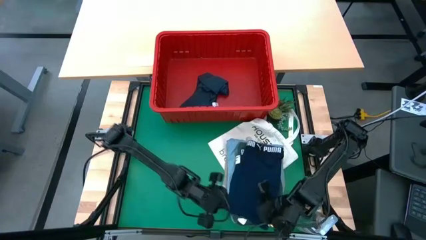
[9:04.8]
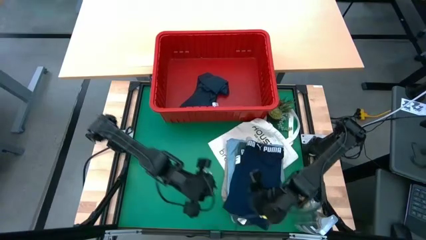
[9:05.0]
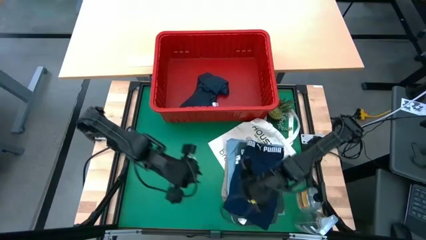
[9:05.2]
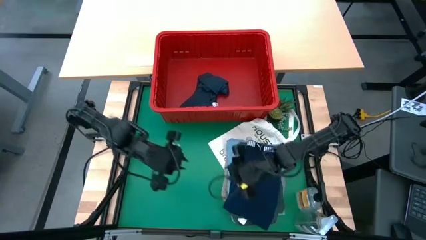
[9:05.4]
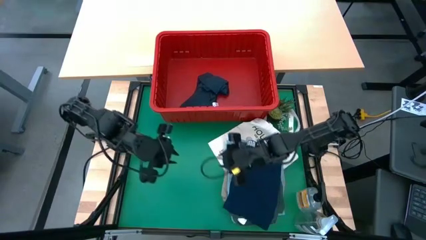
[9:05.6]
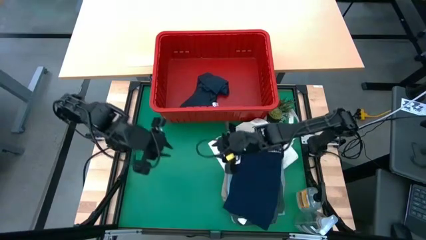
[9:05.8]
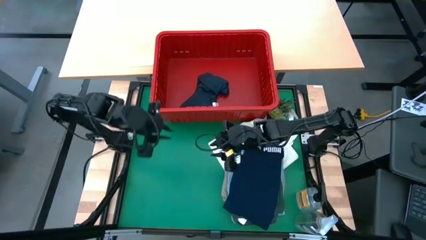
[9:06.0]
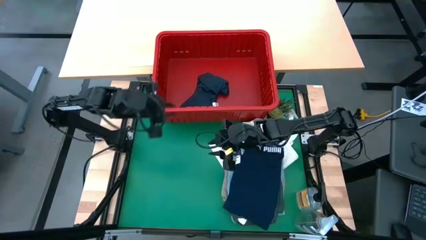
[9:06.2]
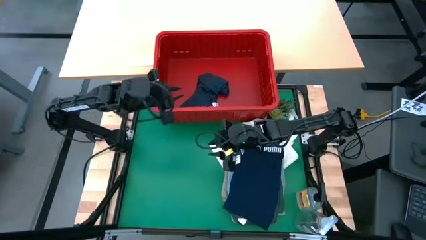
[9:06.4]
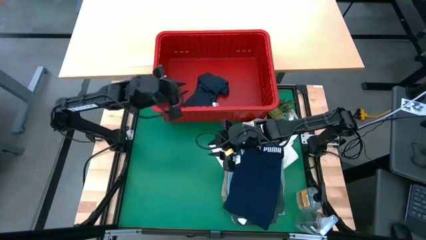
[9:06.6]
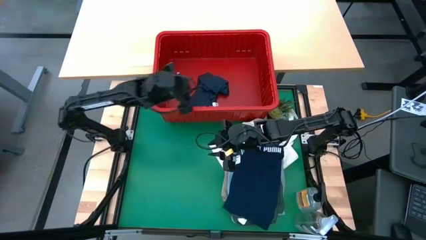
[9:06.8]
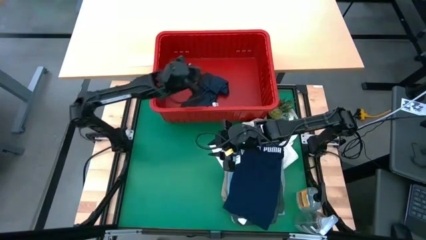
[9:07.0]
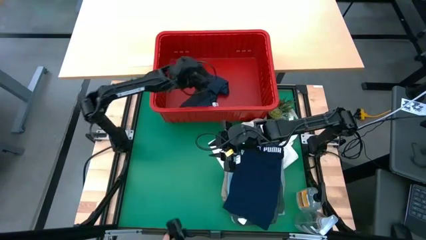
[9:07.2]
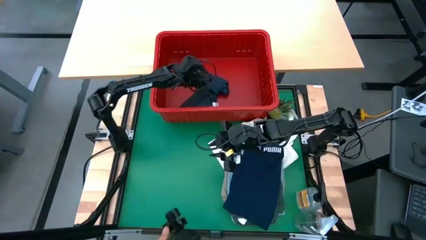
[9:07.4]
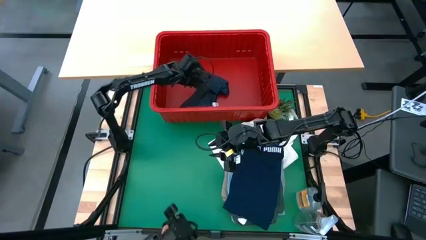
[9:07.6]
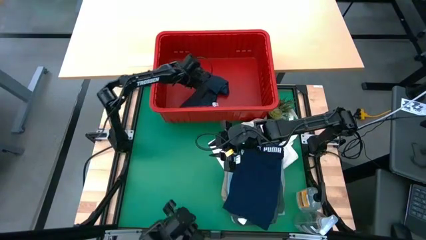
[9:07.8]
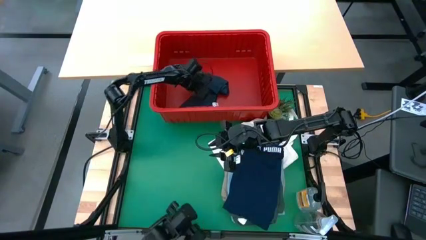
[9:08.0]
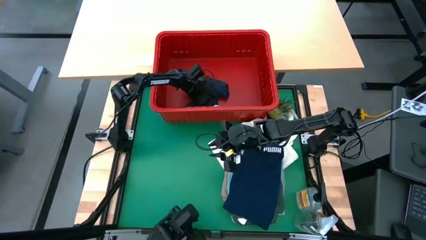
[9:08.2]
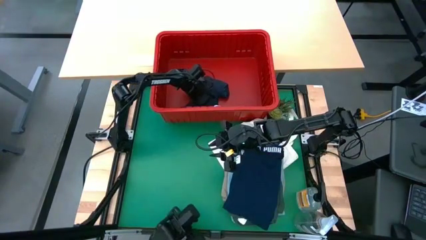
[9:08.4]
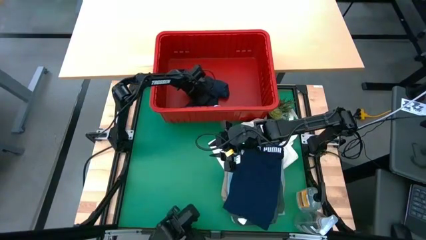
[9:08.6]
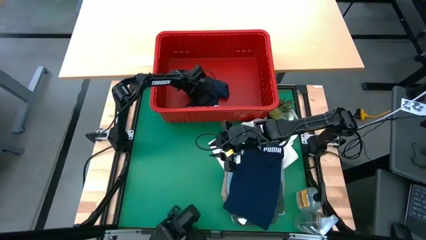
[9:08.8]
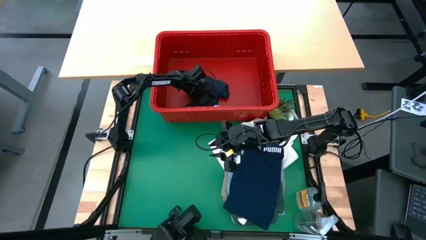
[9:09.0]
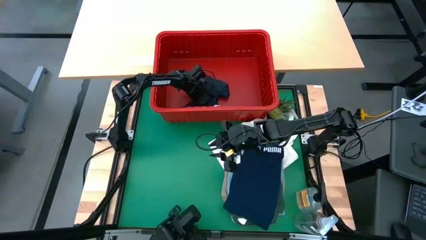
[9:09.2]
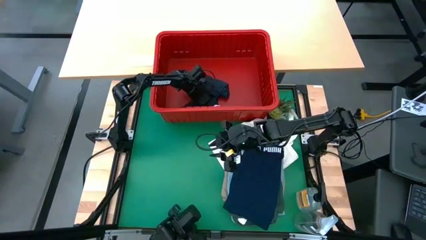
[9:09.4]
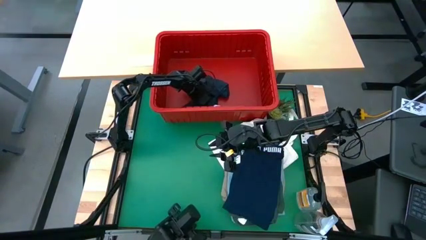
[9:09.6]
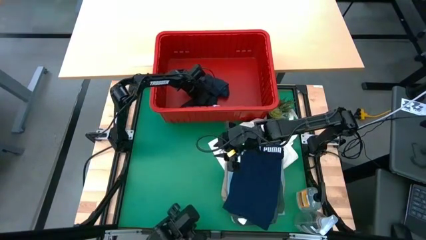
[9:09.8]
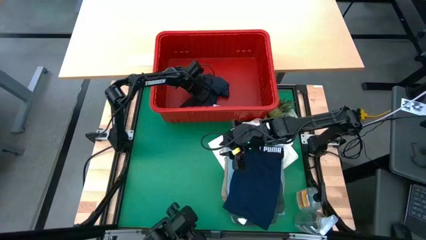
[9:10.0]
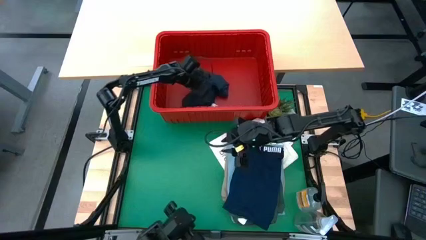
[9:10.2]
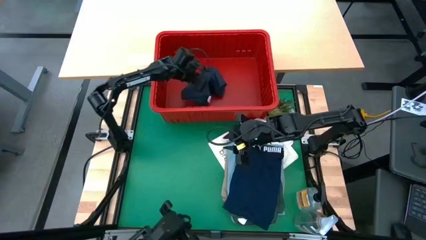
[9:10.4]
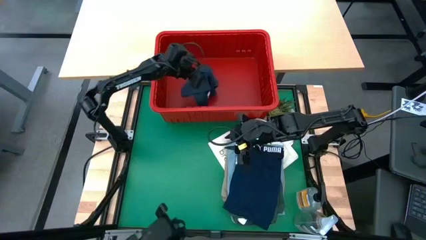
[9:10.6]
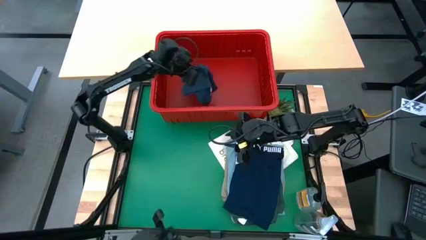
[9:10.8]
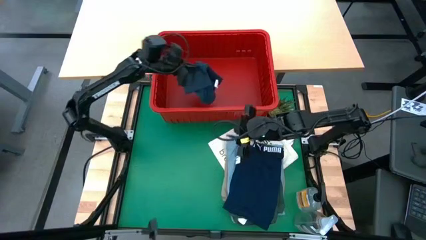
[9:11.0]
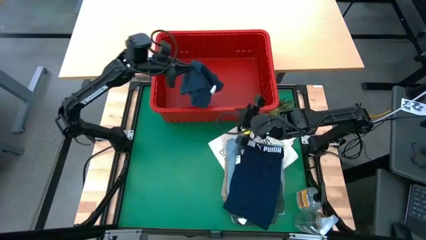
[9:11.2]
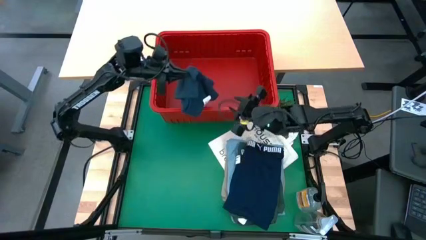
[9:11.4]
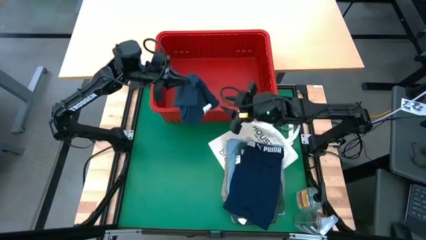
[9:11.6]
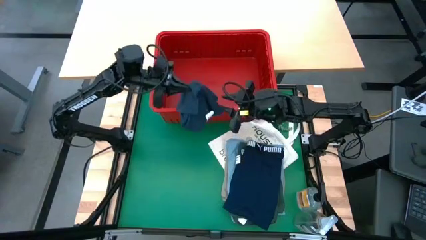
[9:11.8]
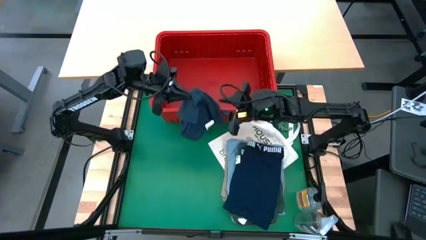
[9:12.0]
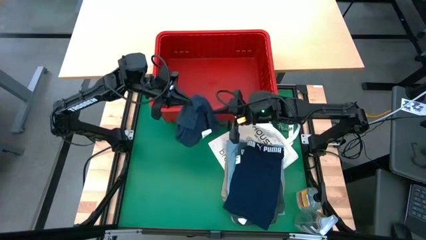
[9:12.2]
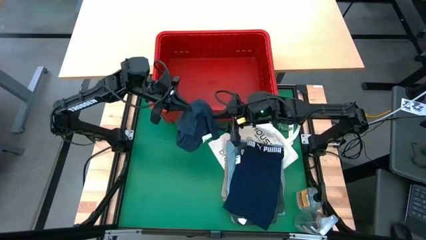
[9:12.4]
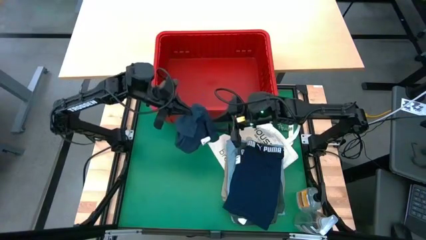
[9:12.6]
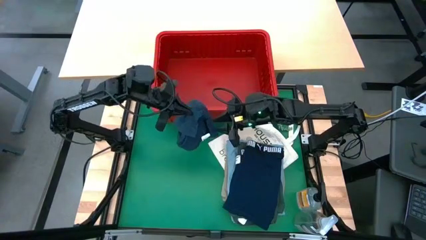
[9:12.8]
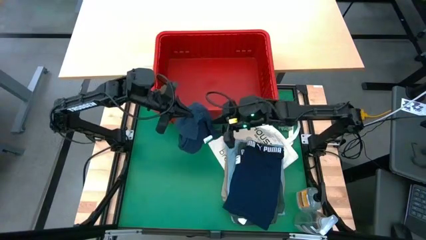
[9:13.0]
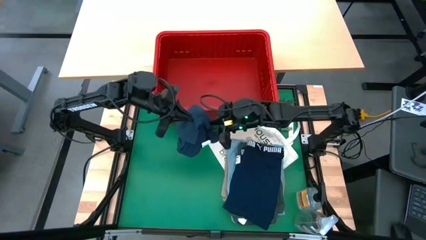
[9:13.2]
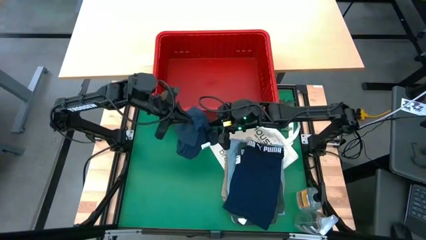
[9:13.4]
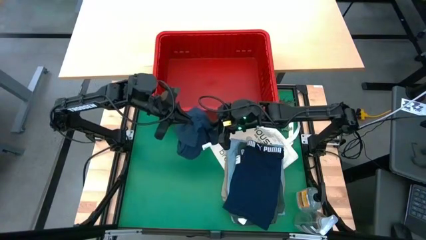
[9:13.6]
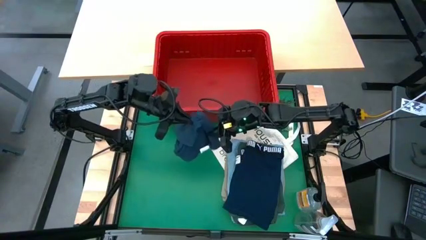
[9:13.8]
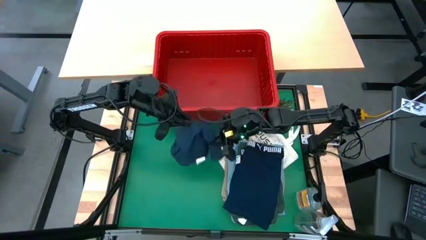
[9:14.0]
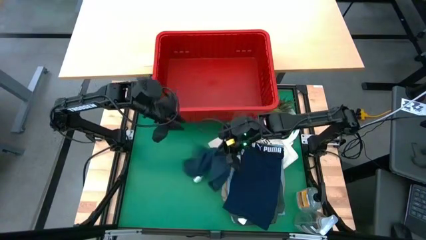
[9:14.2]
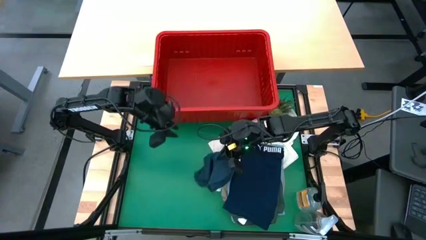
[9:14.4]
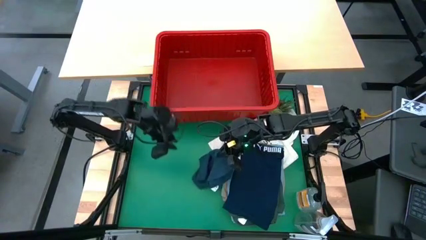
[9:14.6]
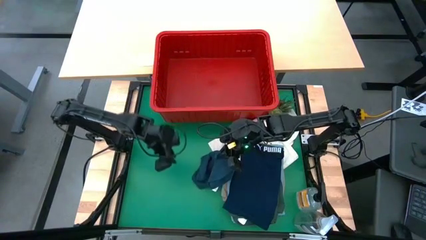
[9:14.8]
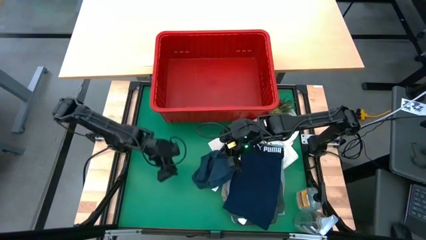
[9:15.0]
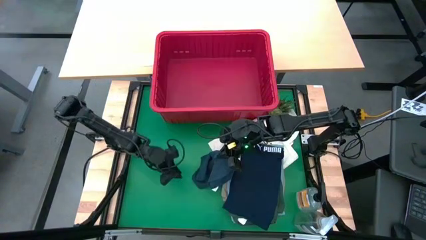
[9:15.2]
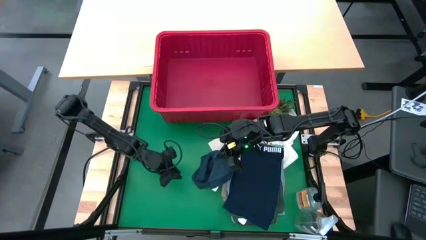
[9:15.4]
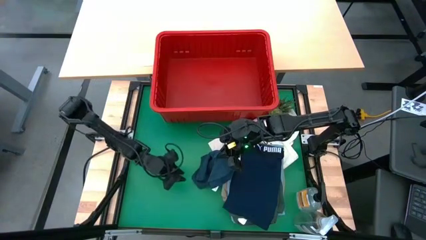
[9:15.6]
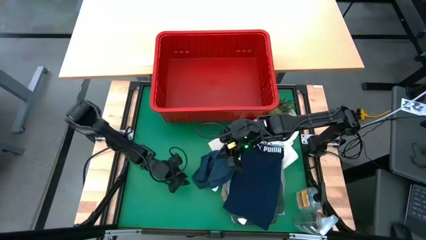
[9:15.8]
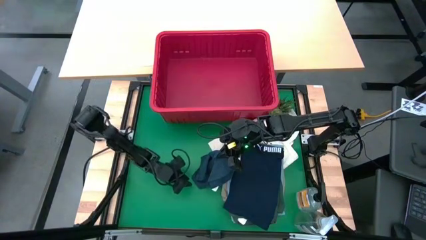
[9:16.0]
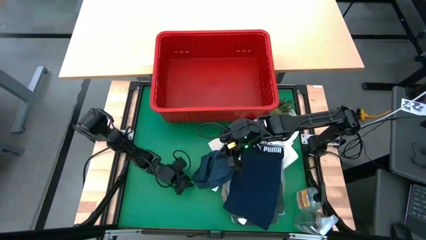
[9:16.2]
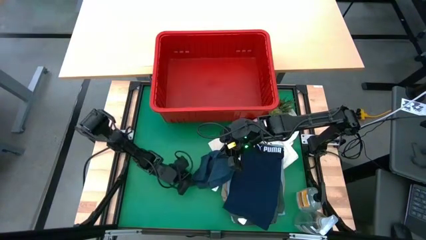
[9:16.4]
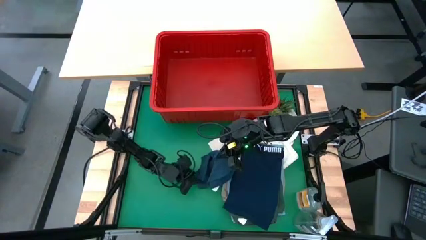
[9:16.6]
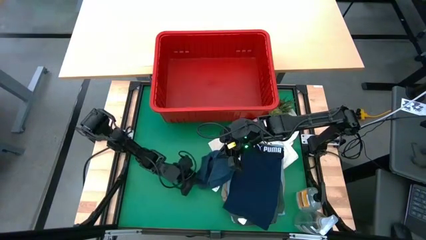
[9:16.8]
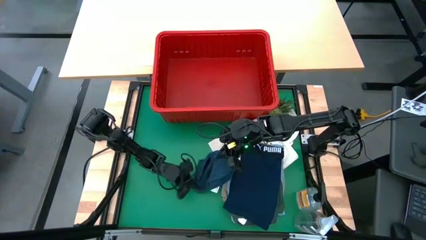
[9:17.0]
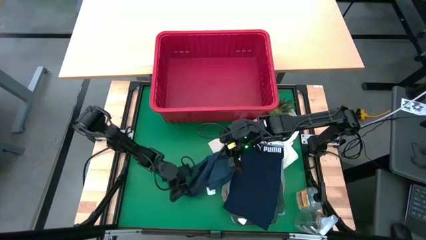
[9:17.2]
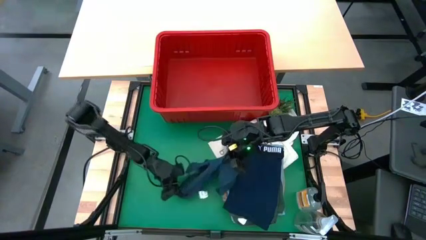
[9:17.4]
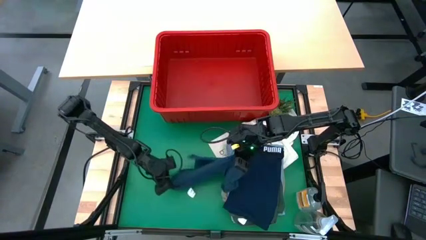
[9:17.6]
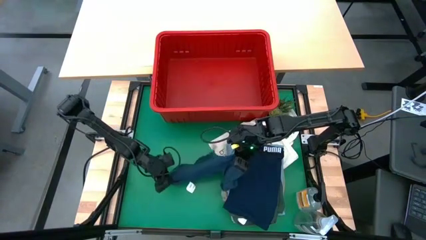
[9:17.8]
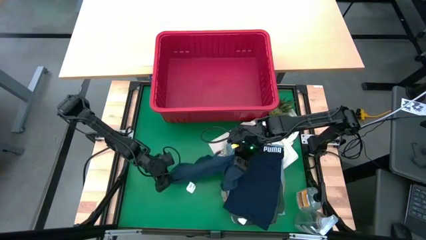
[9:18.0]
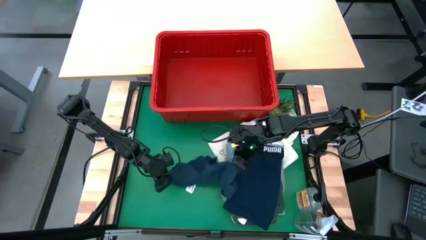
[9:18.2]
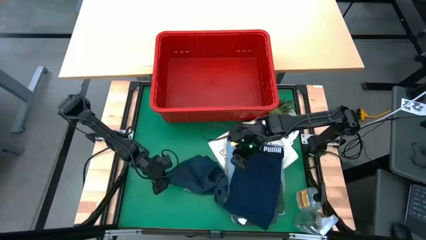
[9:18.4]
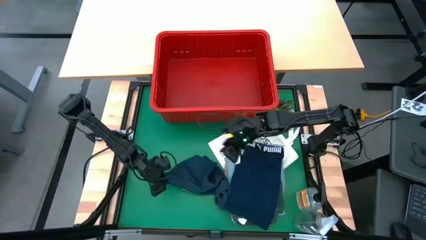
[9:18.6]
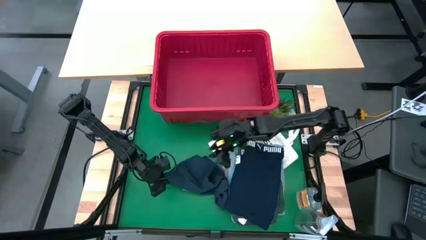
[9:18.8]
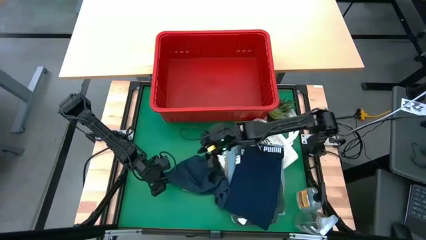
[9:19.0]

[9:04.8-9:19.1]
Task: Fold Laundry from Bin
Fold the dark gray shorts

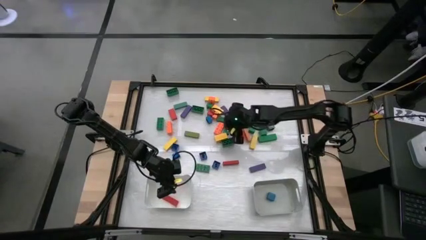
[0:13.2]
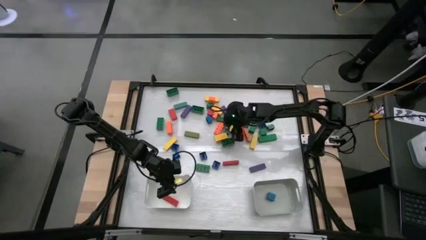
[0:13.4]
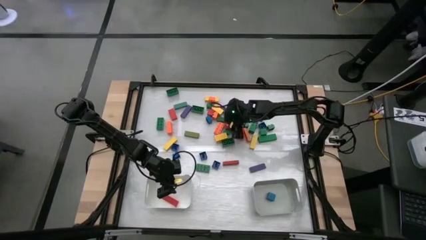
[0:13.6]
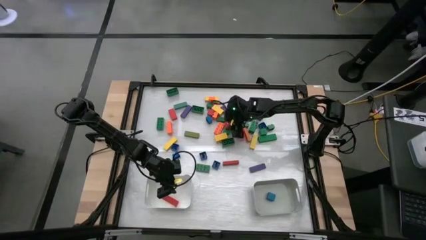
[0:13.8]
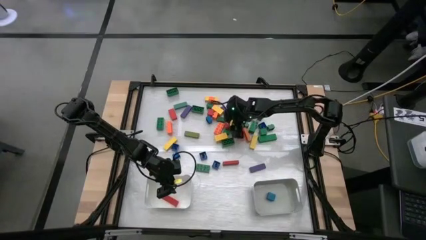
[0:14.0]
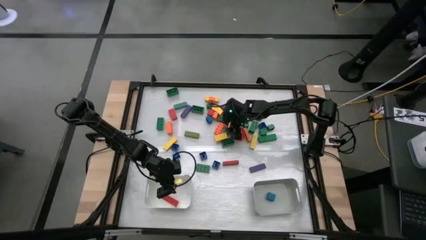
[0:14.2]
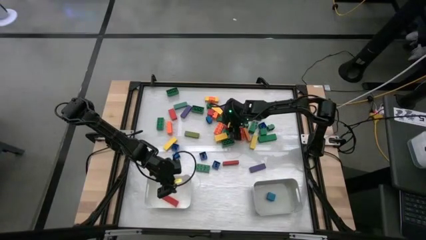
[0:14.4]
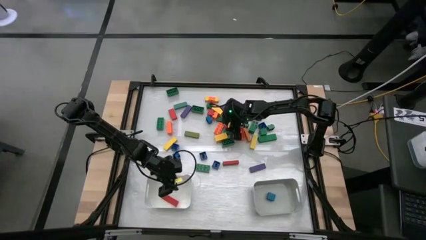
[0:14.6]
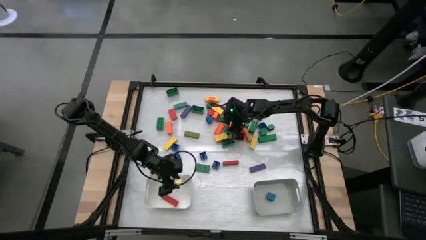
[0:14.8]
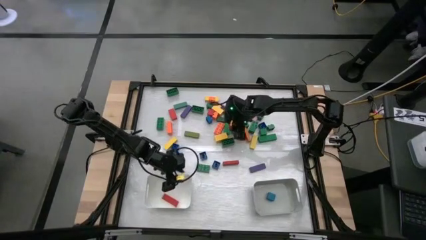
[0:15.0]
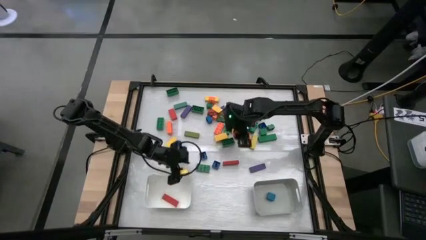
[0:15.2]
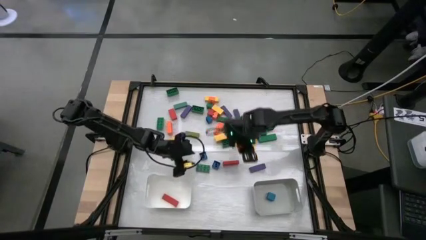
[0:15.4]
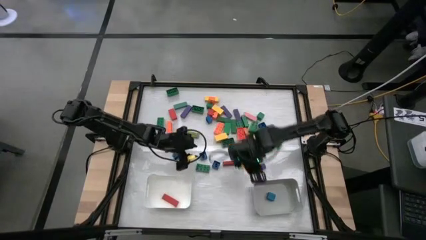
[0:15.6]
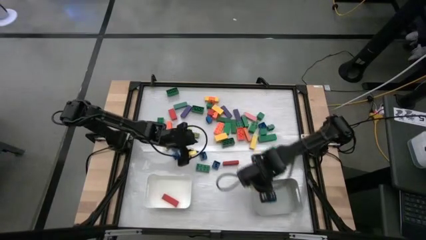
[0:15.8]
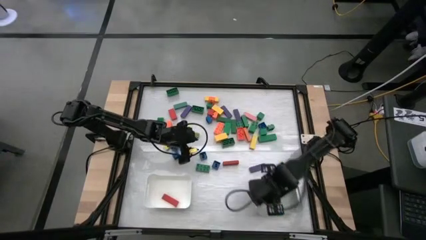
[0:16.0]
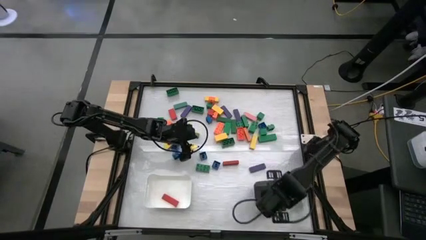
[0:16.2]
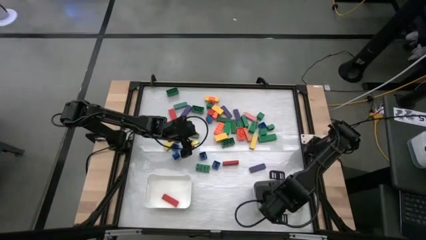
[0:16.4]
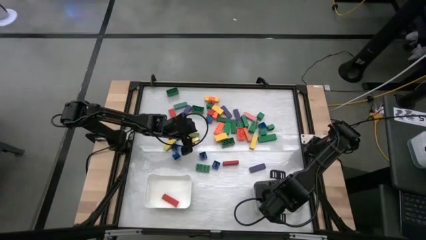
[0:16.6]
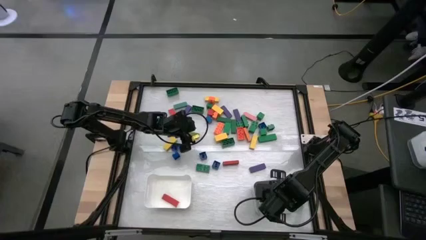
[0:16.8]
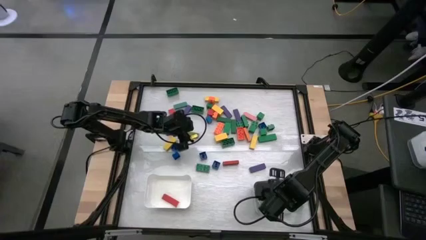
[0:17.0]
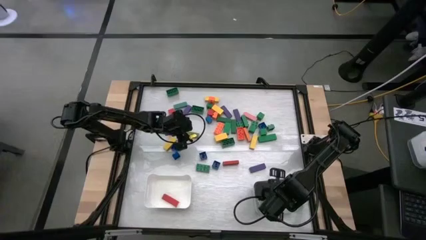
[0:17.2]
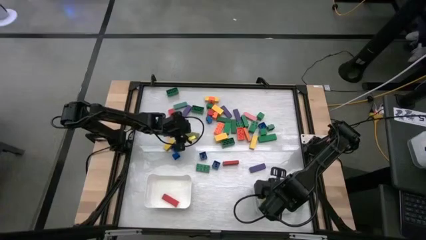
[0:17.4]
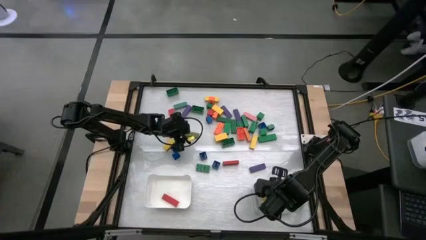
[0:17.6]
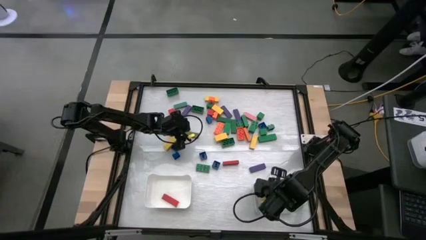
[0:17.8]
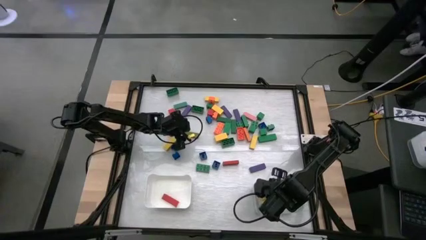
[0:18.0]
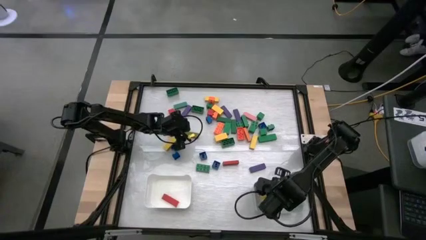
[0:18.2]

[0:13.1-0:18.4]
Task: Sort blocks by size
Put the square red block into the gray bin
